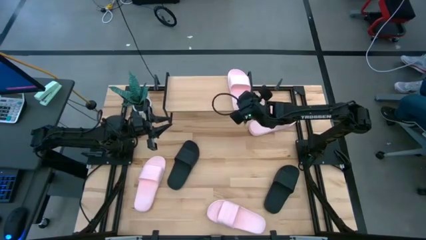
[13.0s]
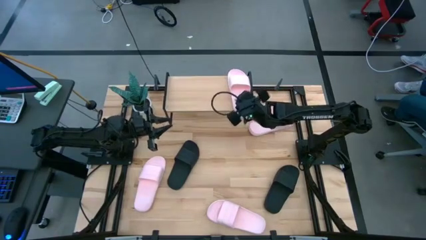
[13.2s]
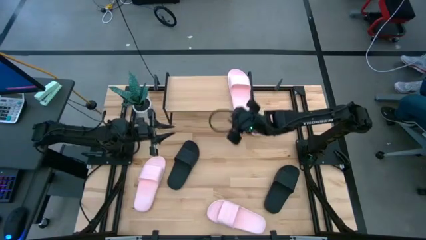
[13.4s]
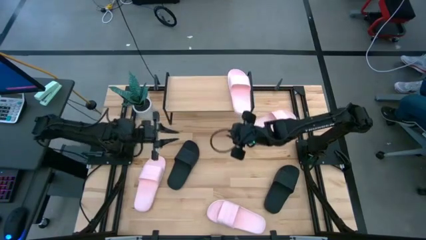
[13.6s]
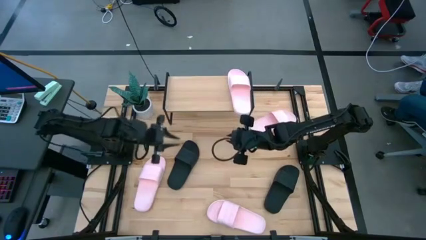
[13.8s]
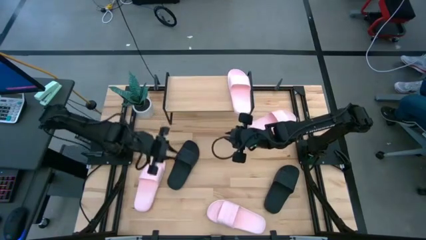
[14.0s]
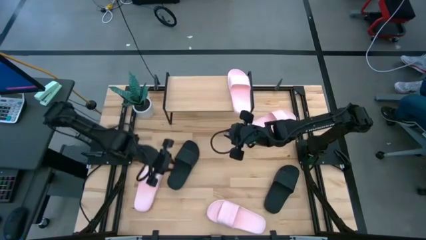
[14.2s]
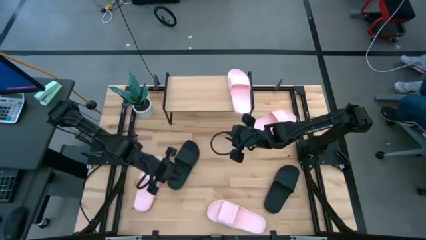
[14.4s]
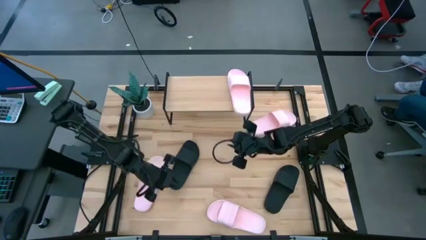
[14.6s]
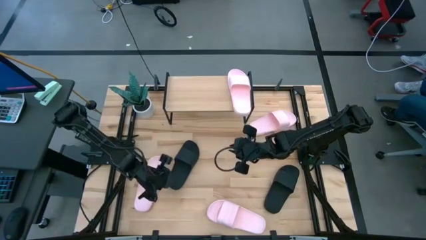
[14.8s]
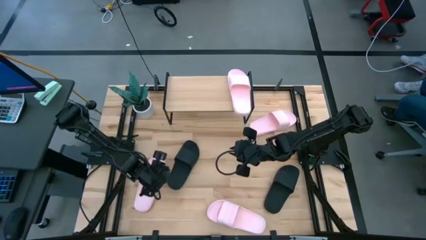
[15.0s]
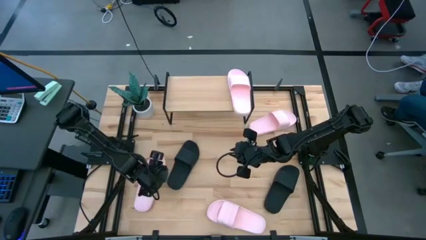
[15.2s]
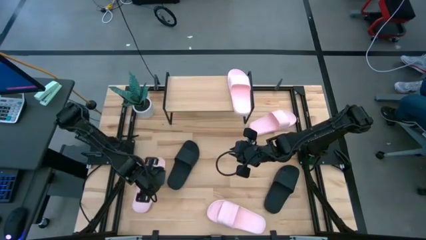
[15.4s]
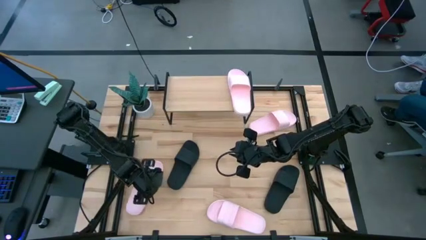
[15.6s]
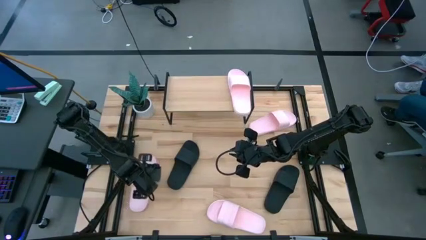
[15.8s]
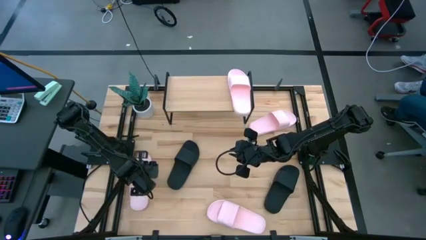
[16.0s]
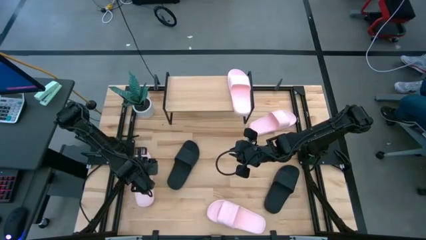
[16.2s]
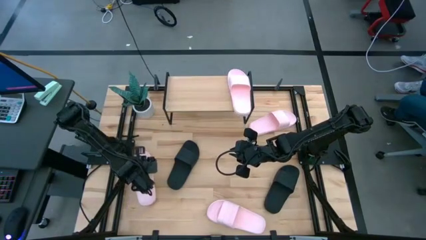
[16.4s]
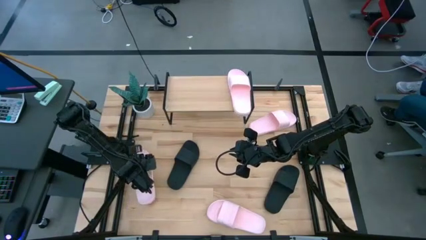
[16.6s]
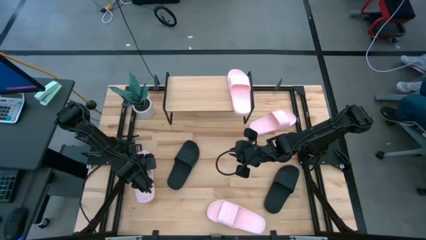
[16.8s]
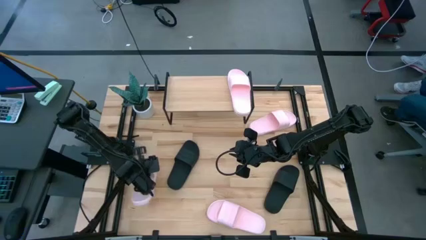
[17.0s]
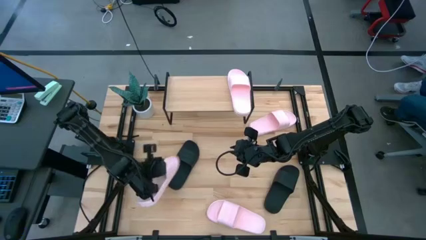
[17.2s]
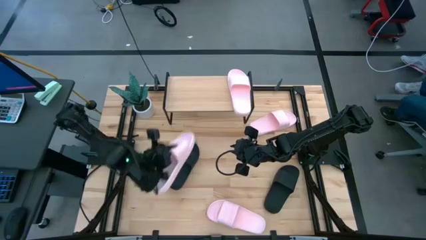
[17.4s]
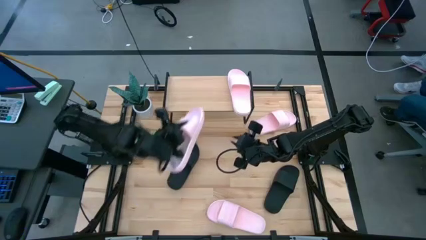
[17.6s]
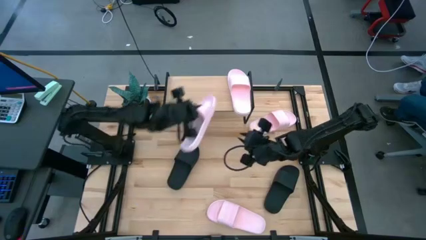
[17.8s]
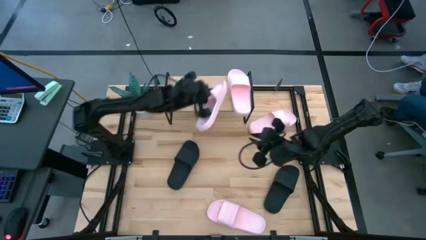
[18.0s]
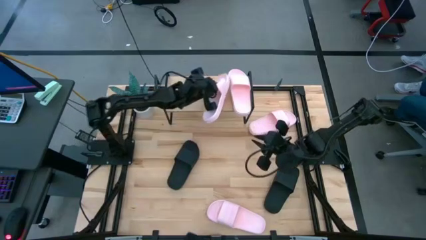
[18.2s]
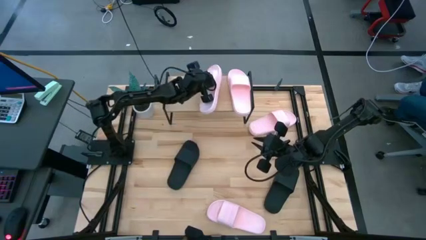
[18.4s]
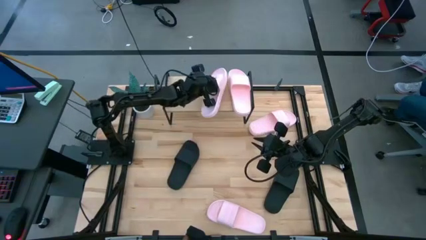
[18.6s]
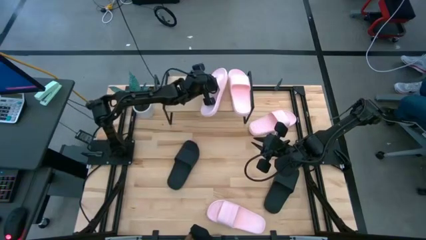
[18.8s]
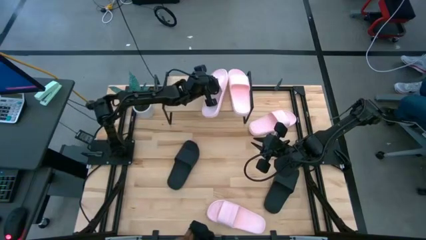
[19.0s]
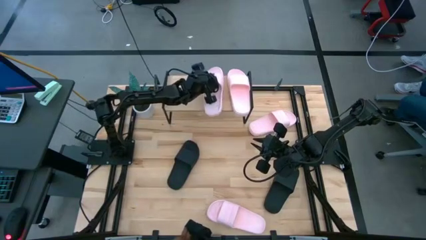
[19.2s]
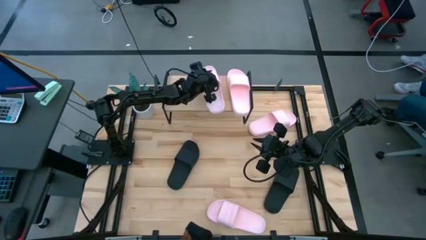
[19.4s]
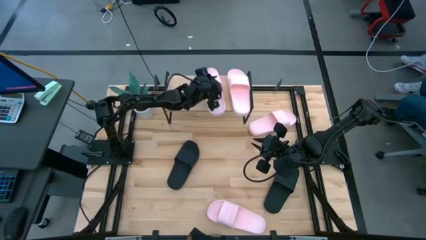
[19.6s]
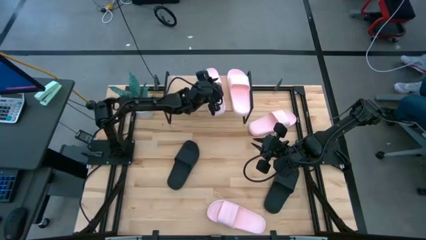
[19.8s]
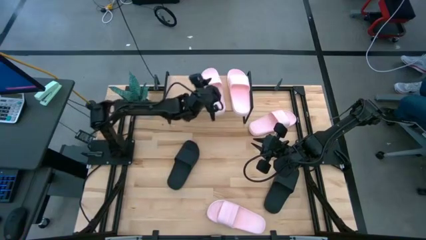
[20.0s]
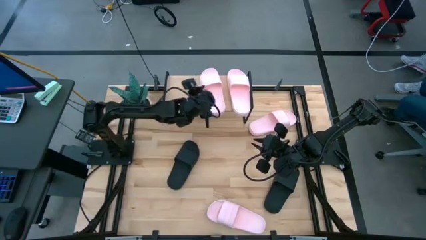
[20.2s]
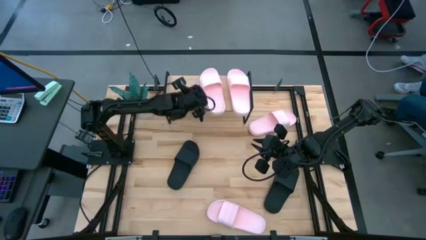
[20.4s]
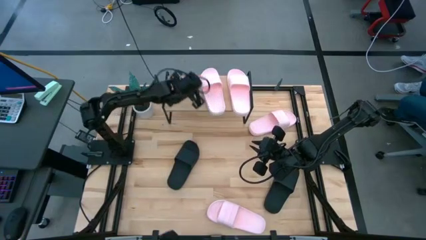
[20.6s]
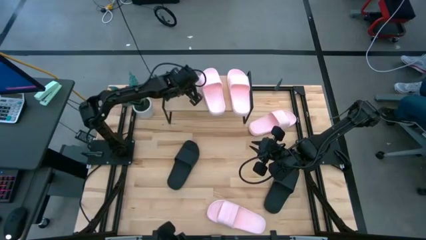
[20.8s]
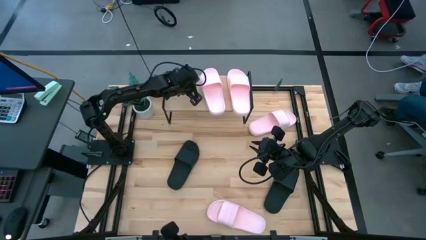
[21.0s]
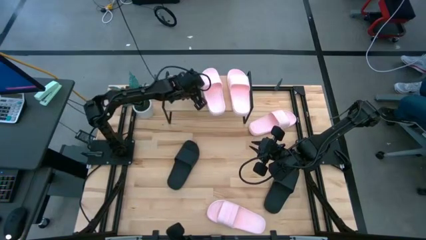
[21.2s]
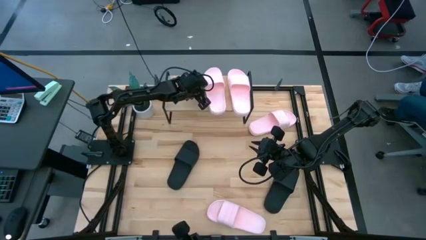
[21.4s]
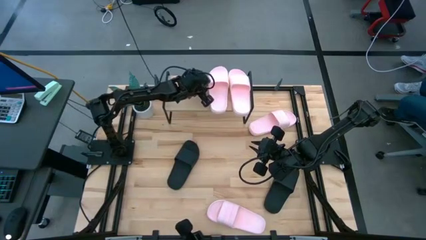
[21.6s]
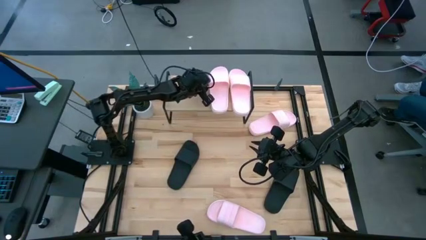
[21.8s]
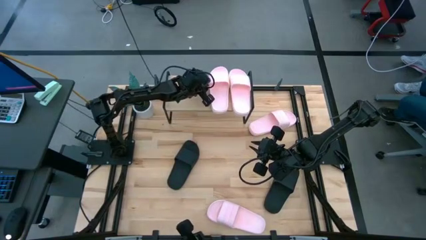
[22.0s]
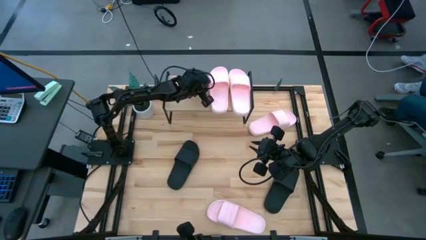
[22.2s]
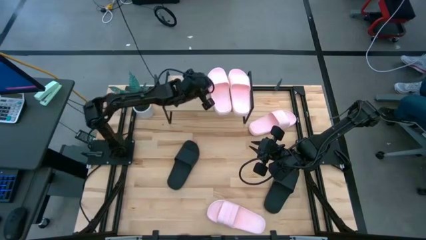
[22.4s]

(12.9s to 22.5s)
Task: Pick and place slides into the shelf
Put the middle pink slides on the shelf

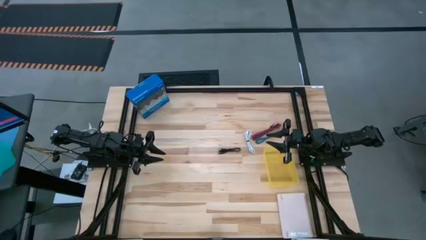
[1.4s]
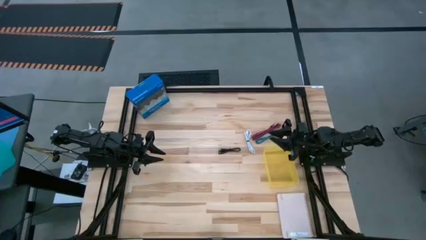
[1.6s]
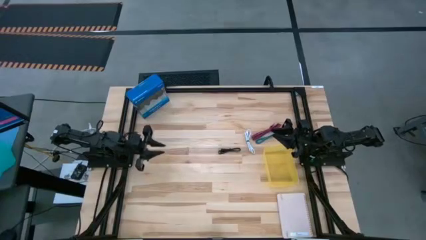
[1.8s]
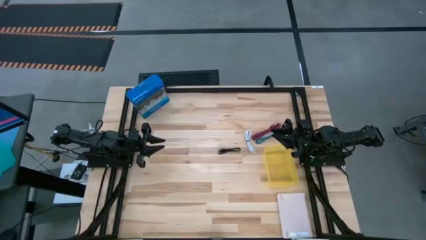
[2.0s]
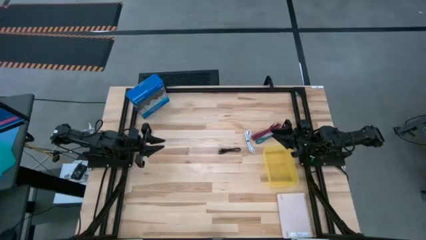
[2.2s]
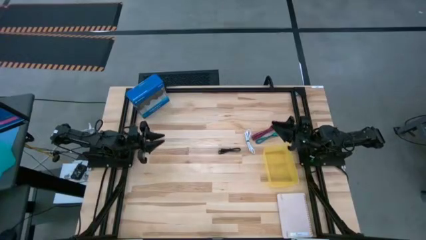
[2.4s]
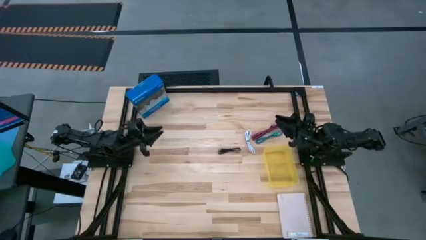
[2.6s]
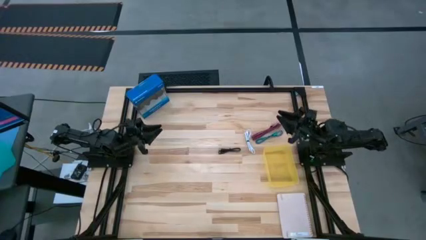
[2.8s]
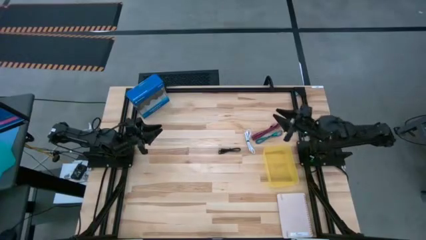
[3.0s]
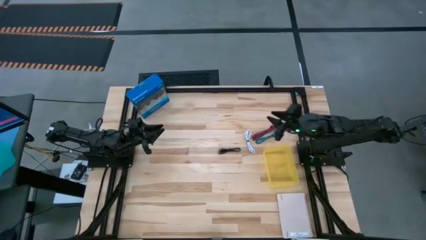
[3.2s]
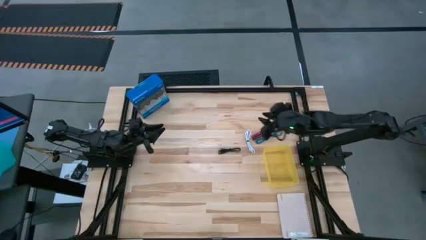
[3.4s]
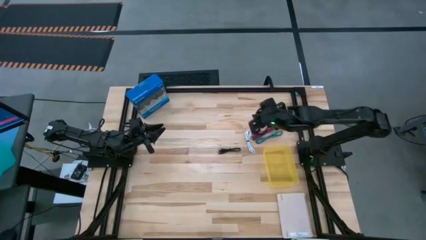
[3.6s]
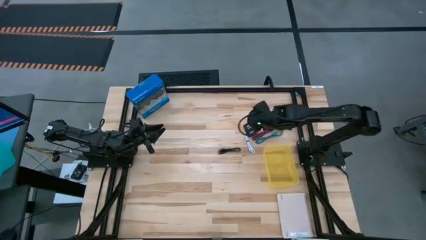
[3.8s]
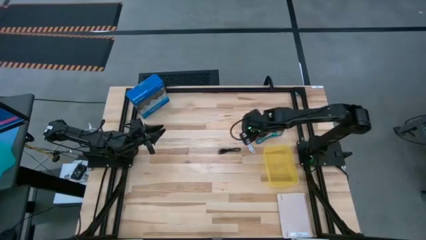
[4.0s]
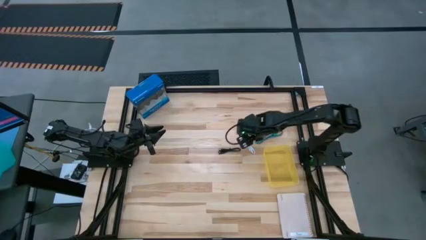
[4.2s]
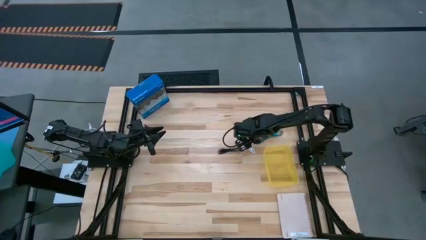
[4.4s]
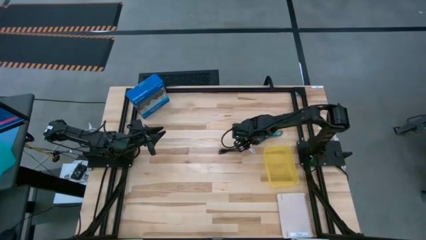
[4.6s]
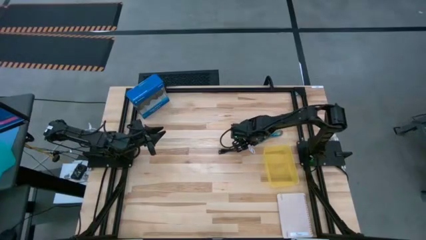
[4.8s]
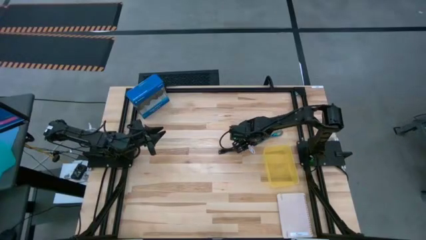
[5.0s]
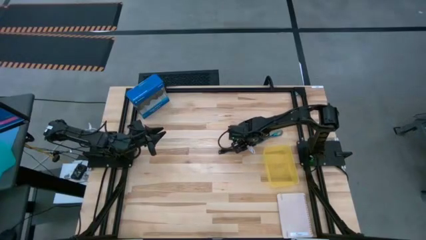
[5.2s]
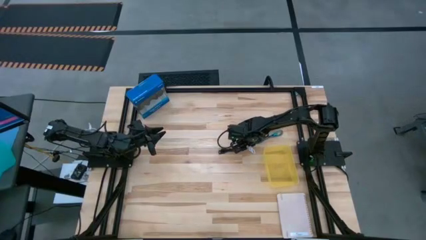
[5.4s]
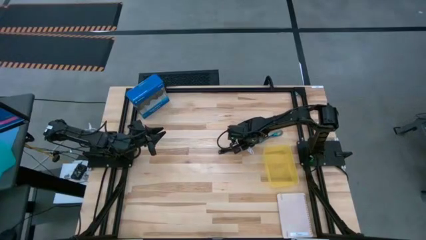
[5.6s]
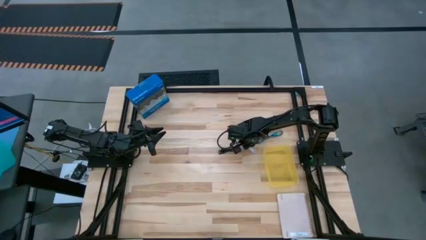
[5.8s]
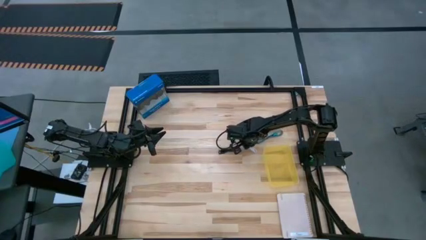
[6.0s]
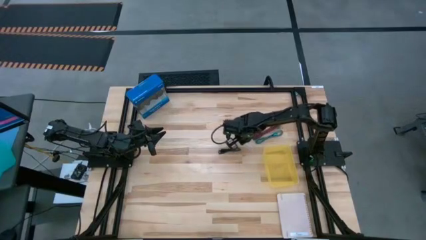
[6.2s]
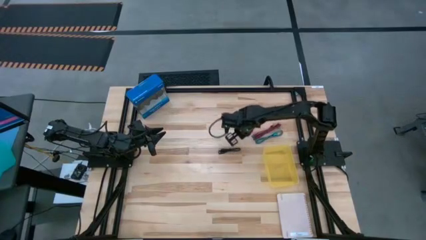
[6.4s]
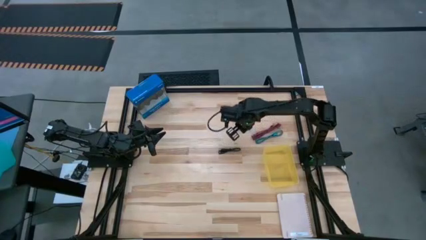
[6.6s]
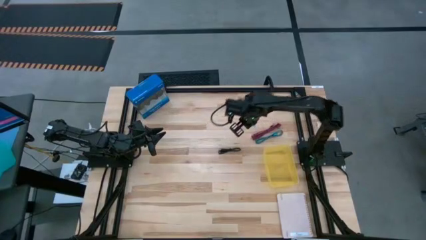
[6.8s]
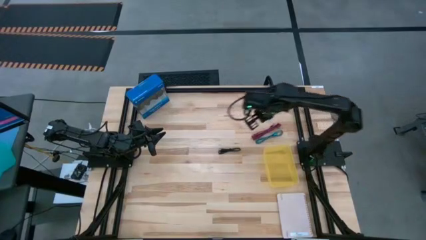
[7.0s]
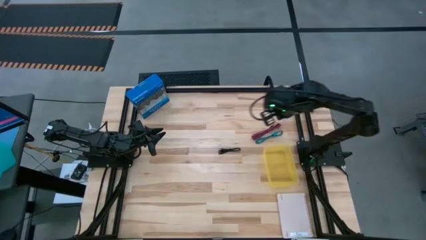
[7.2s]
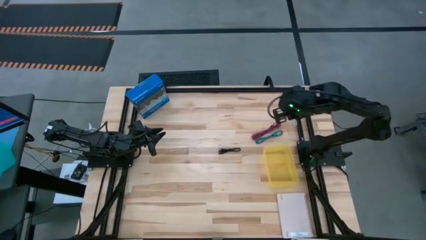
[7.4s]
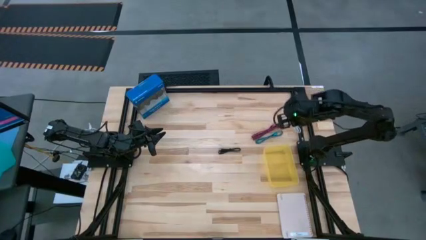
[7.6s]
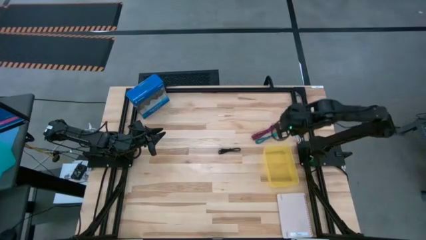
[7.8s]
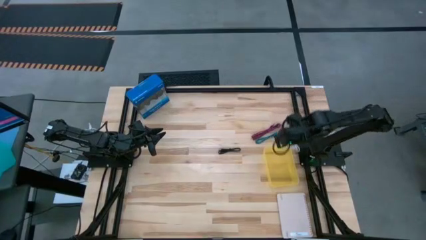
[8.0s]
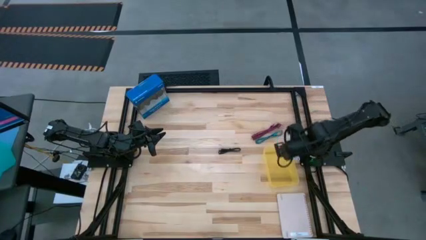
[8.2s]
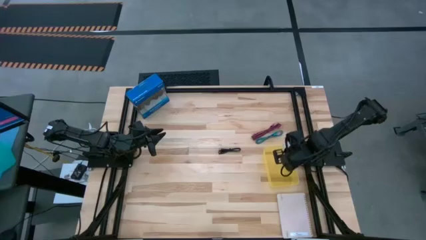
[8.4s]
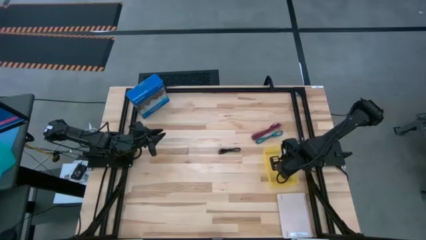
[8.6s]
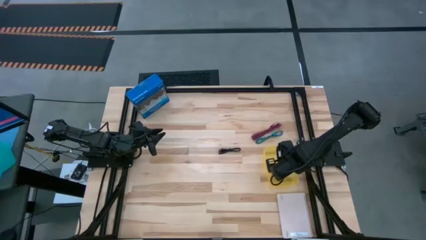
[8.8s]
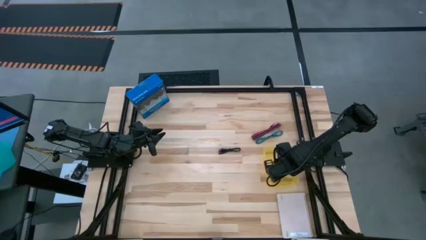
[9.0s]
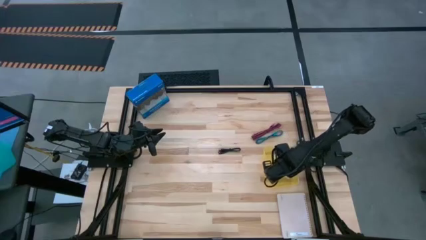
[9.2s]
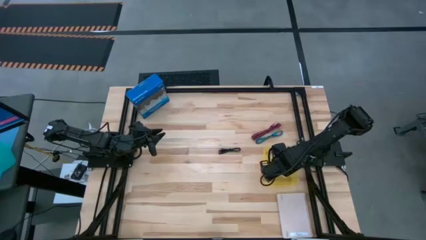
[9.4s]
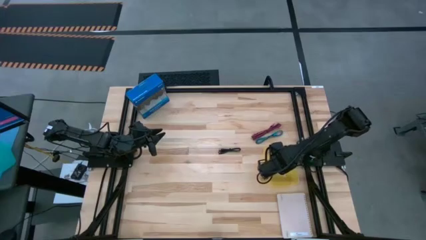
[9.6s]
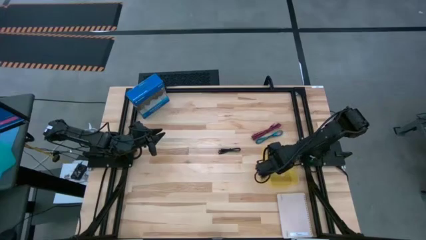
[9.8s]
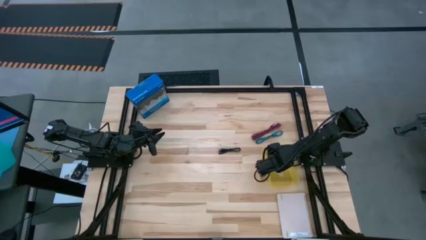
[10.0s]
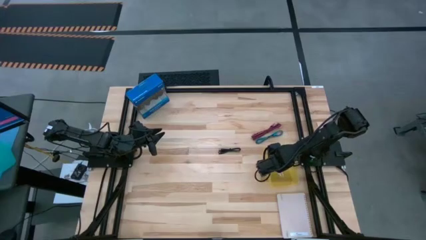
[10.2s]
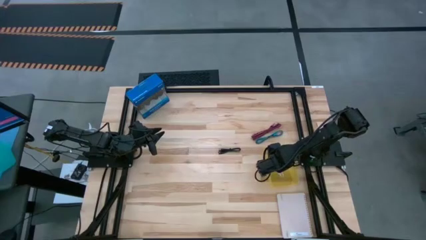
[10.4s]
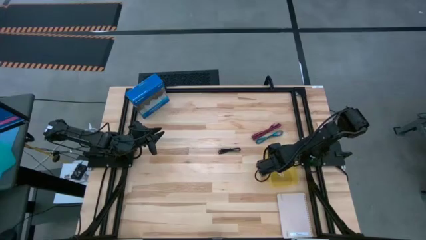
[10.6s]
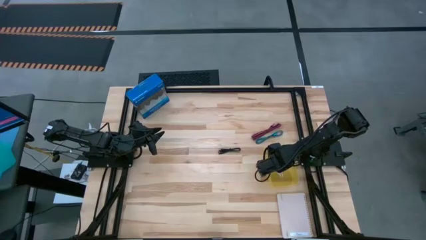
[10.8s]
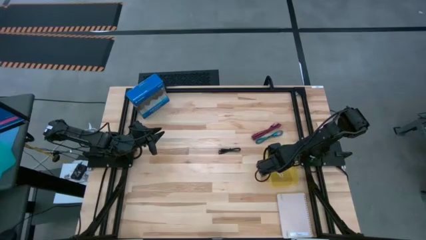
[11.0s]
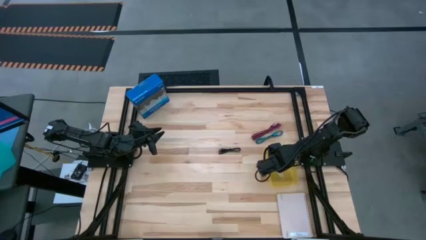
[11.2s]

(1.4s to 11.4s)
Task: Pick and place USB-C Cables
Put the white charger cable into the yellow bin
